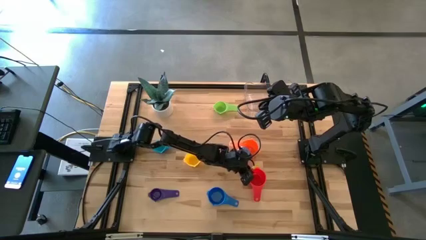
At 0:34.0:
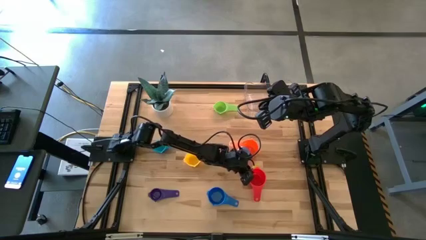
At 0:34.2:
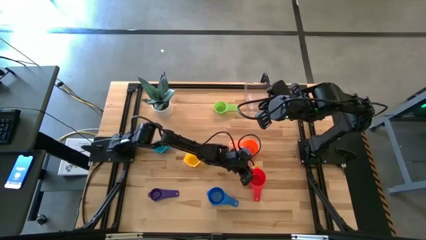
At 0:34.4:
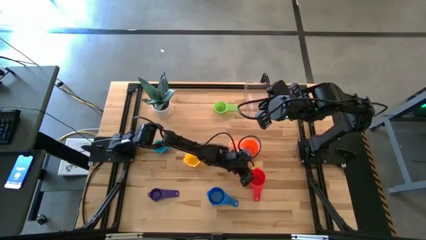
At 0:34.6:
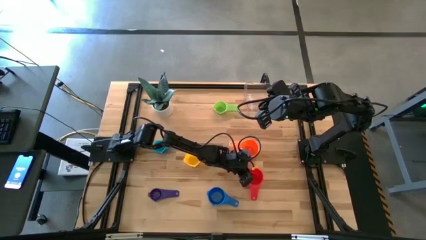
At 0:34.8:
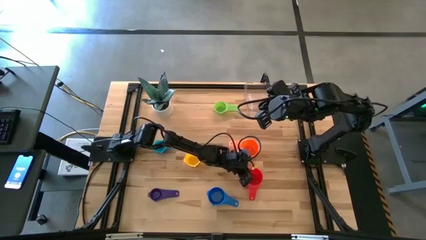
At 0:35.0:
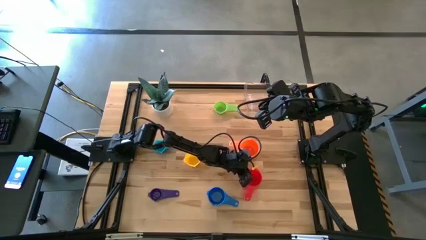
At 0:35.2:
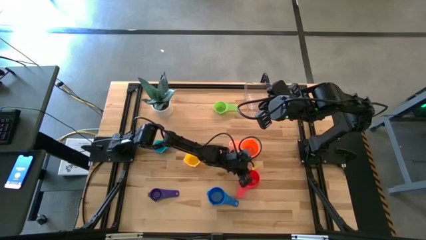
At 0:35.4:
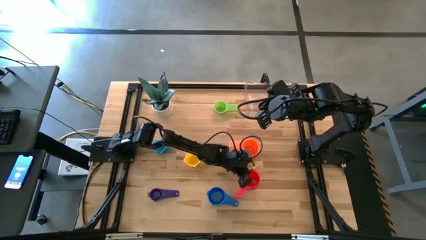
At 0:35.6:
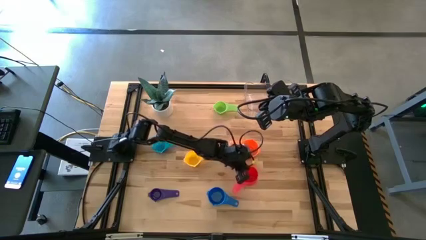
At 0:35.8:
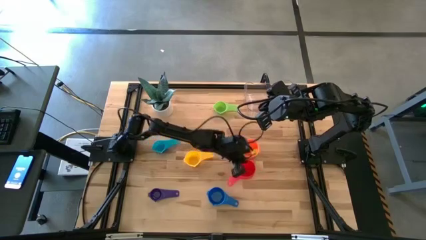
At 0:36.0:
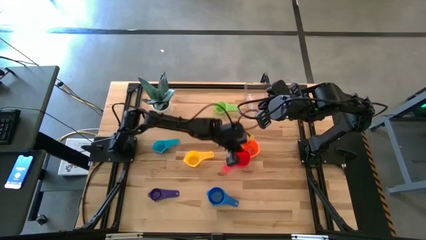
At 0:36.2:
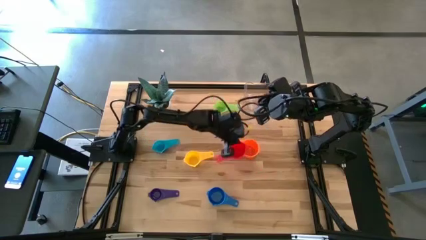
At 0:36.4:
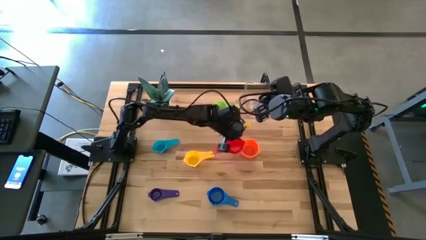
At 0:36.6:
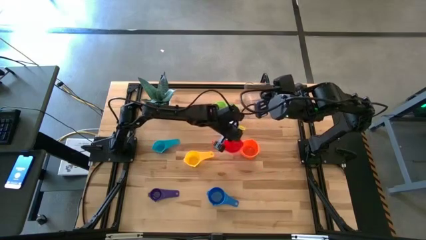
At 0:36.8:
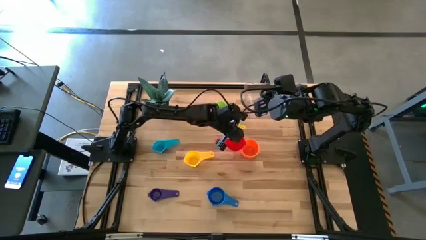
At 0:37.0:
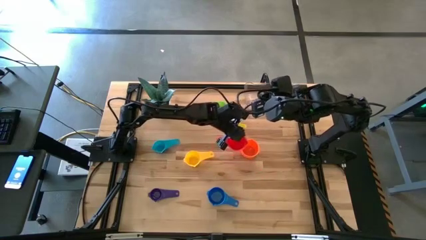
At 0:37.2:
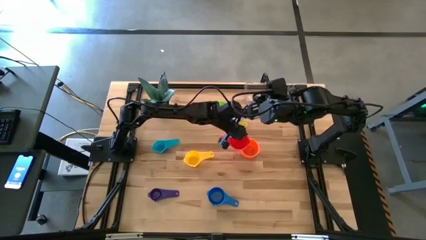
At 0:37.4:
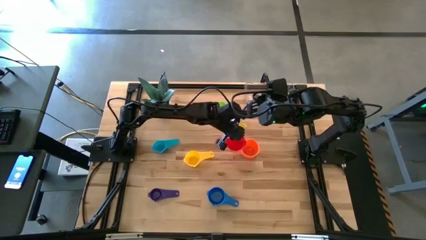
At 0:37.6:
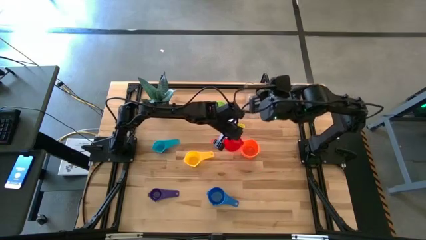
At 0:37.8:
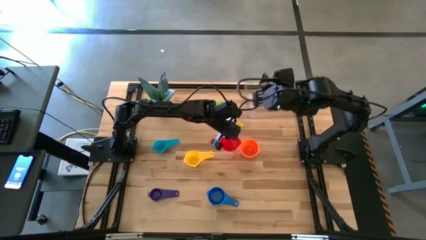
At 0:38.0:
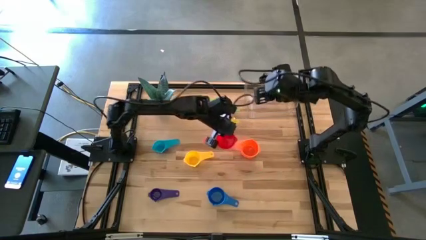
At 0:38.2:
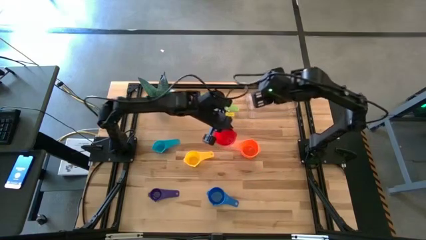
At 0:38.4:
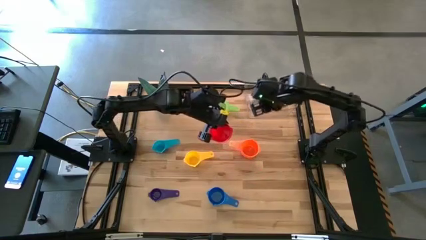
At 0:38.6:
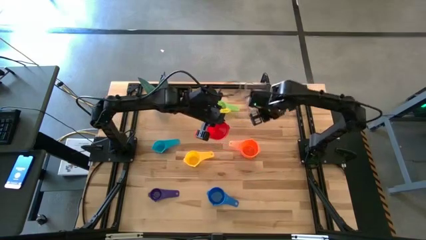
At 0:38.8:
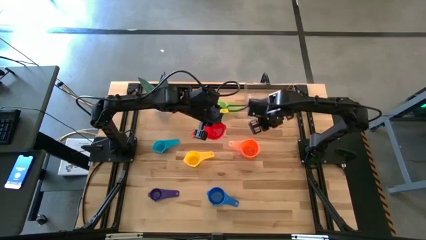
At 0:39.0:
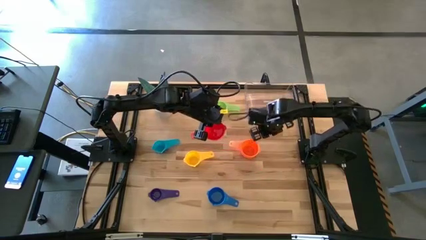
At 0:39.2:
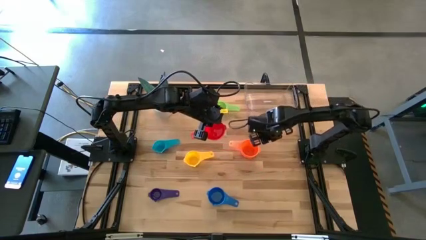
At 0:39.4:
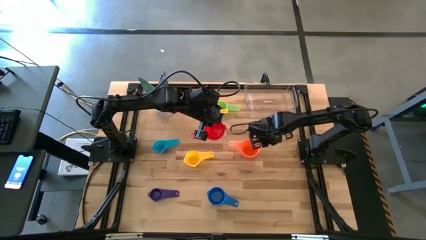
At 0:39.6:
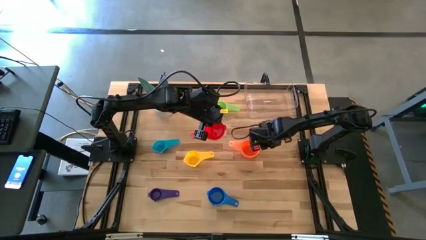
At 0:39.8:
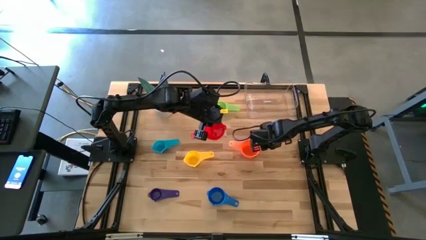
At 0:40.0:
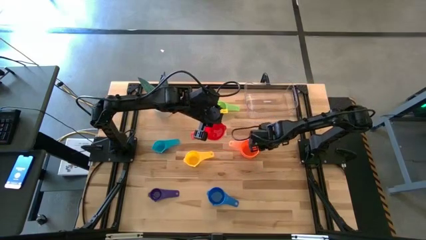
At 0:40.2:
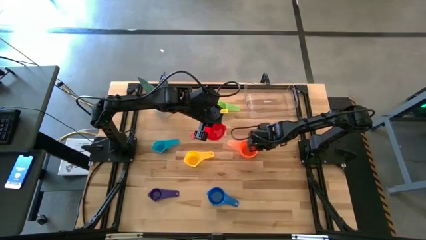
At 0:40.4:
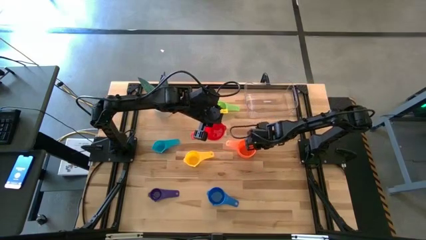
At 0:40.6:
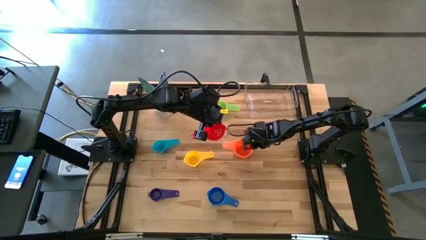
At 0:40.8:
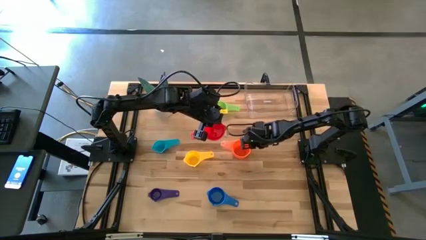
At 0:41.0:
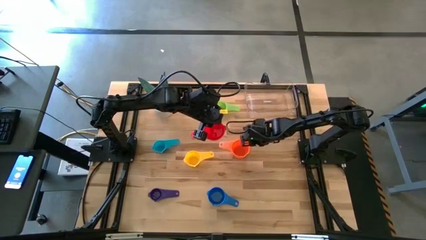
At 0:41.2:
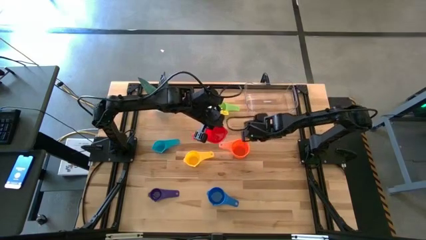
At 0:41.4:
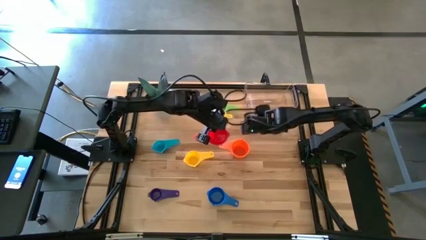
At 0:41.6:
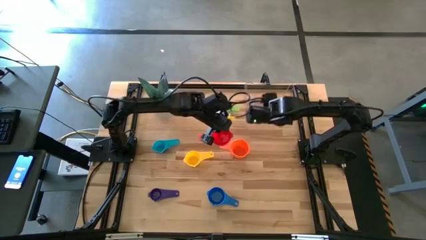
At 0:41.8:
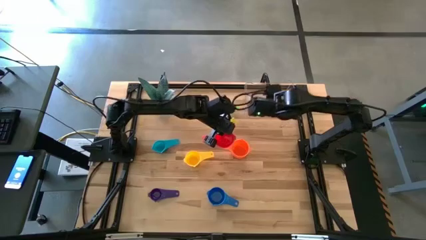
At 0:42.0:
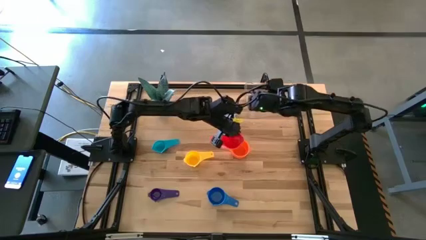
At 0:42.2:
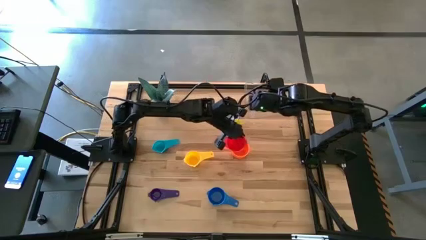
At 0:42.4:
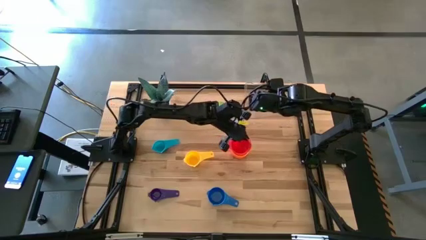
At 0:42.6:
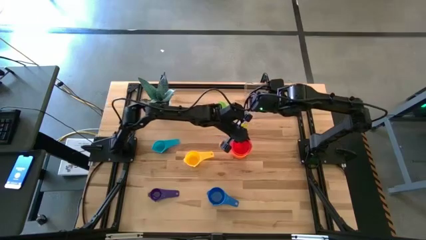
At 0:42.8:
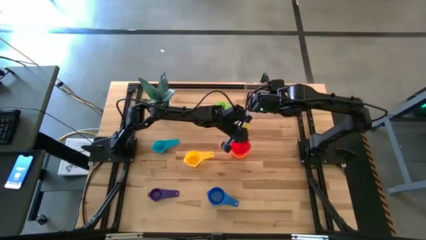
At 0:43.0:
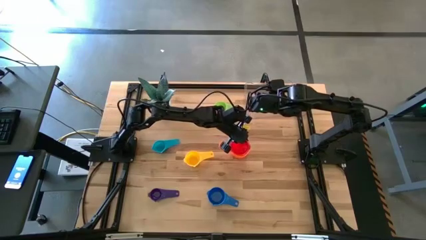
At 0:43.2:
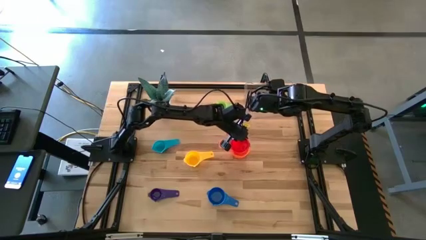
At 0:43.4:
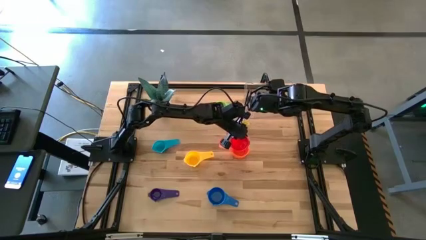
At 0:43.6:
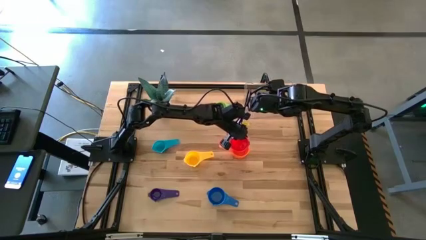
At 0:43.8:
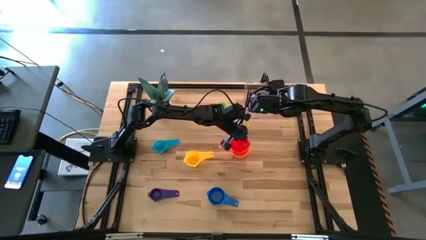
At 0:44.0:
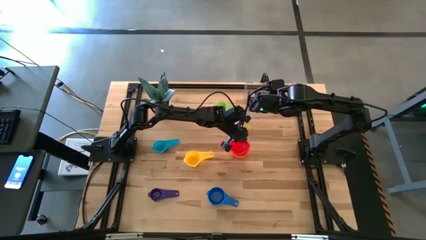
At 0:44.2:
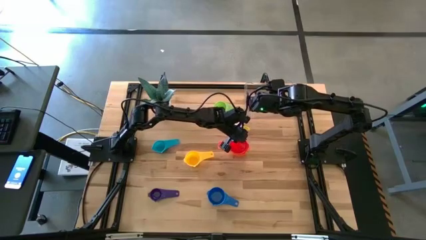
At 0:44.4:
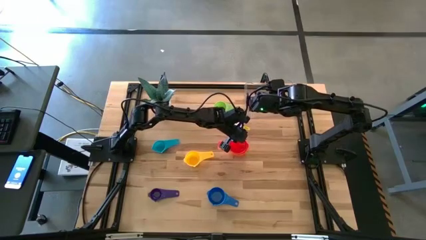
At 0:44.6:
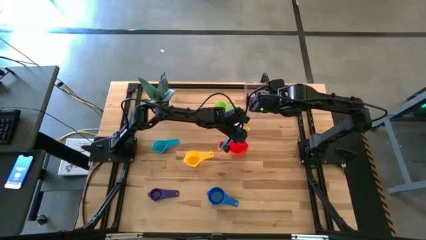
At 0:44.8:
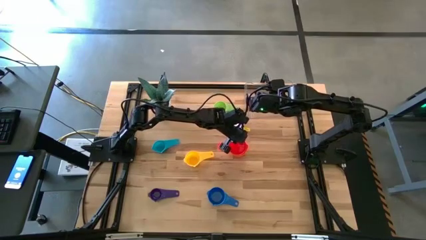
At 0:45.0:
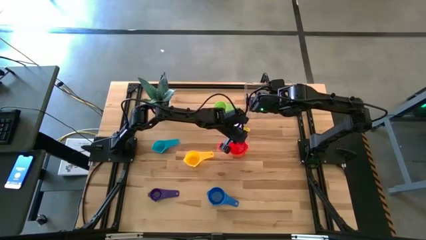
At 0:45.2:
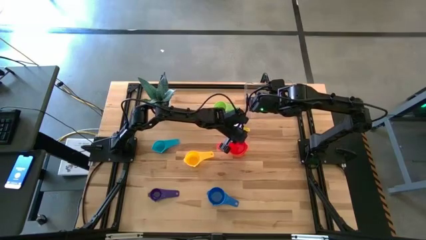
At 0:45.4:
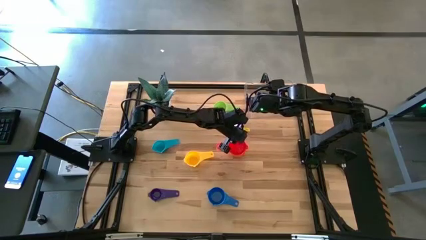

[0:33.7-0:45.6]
Task: Nest measuring cups in basket
Stack the red measuring cup on top of the orange measuring cup

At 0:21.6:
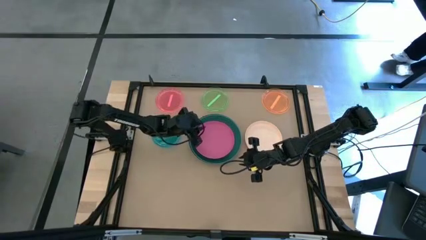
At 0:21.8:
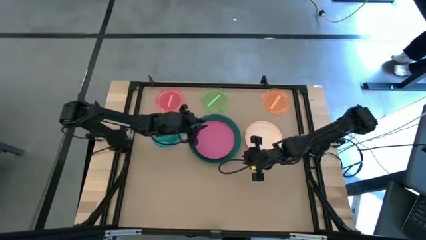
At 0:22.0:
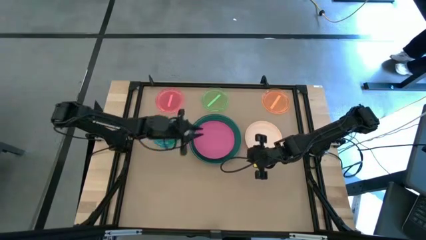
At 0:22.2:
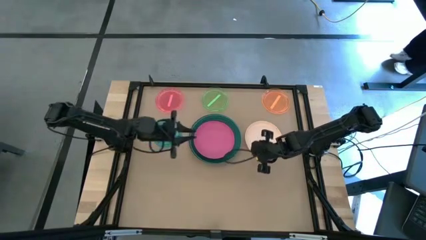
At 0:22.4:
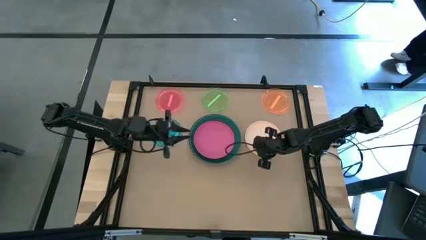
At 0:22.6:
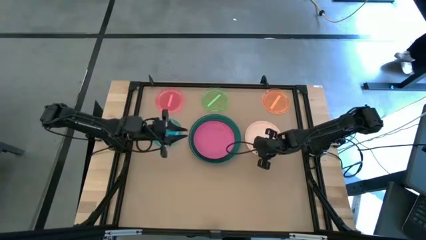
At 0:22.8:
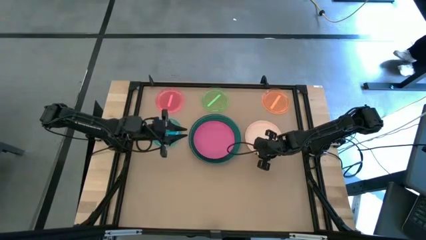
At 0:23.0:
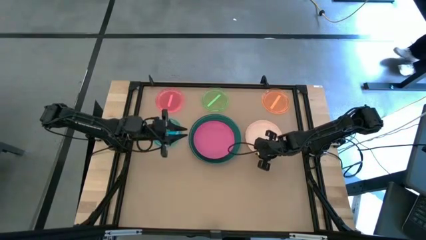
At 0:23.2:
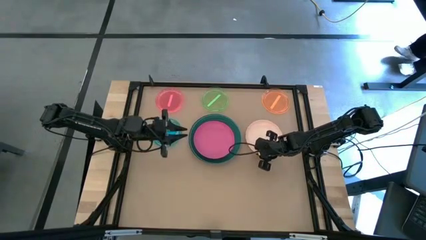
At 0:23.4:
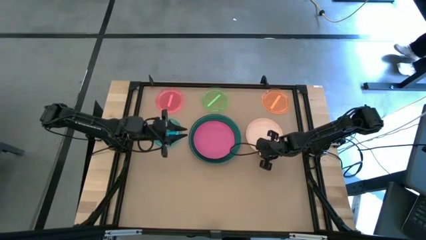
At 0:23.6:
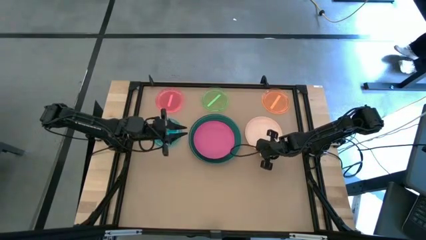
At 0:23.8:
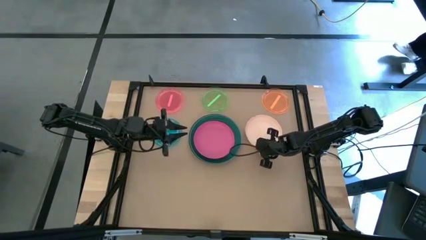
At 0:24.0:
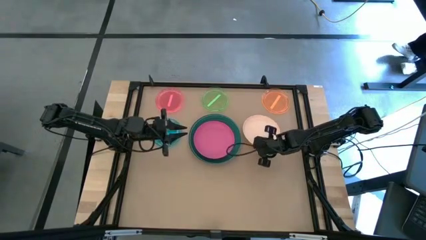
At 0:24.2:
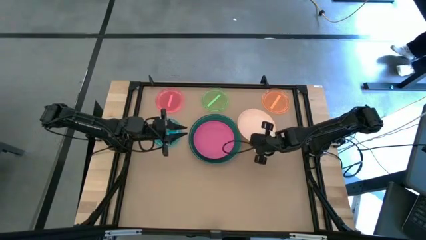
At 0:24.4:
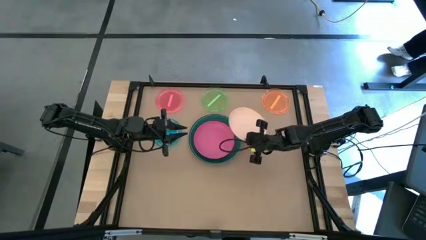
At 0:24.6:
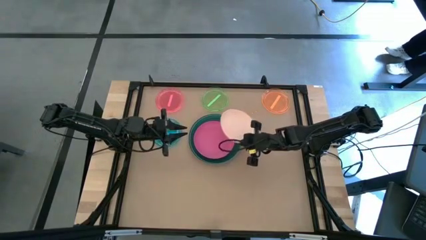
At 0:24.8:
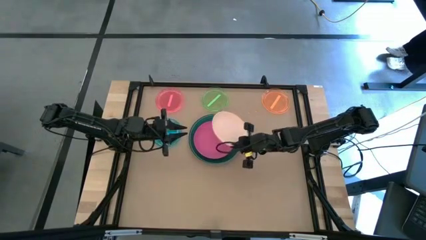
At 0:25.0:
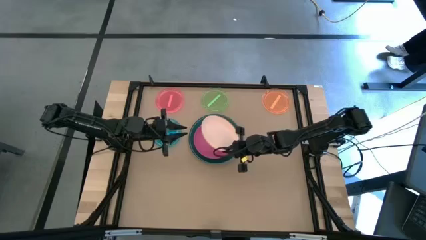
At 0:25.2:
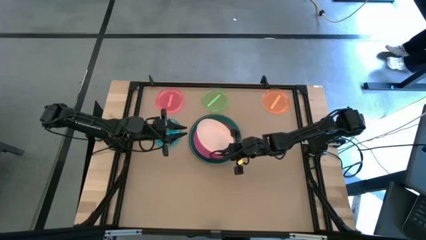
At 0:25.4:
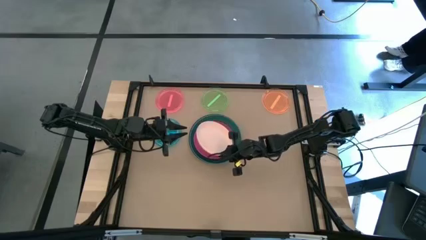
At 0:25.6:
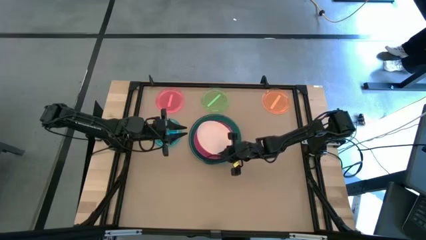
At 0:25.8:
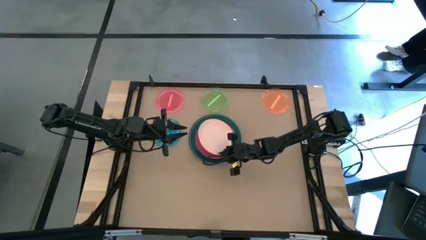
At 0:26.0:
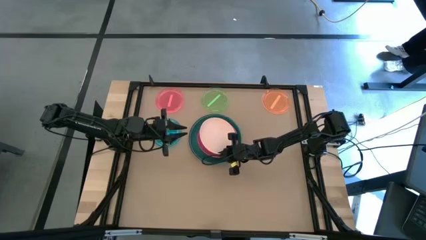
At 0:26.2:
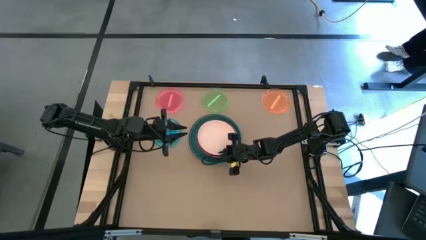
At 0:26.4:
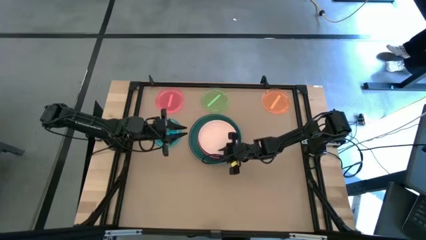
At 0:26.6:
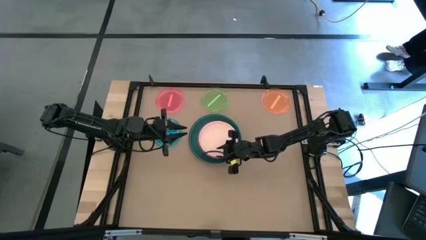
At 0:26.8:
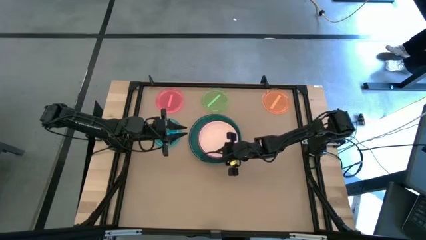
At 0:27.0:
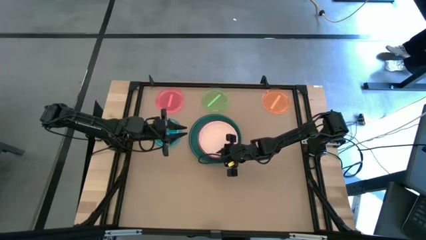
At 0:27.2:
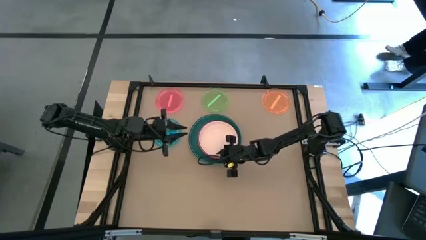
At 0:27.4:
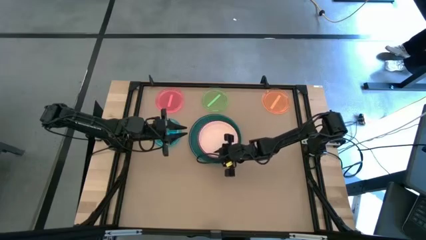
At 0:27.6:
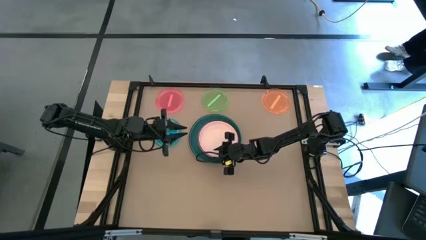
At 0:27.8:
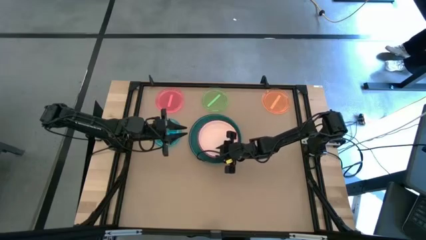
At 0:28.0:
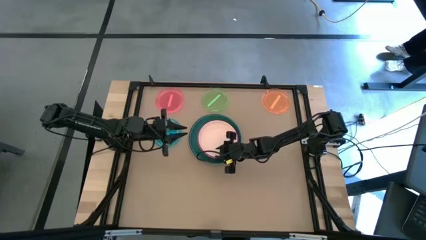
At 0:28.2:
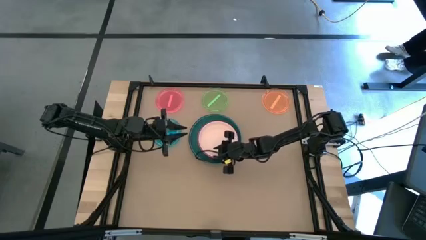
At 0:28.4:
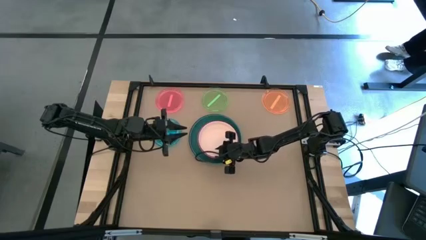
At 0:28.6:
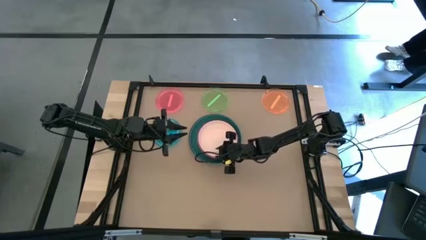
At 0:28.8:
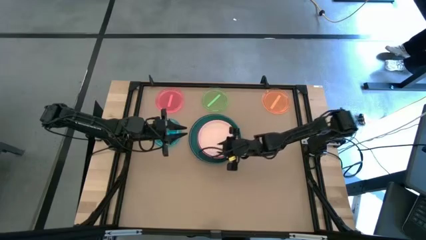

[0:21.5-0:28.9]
Task: Stack plastic plates
Stack the light orange plate on top of the pink plate
